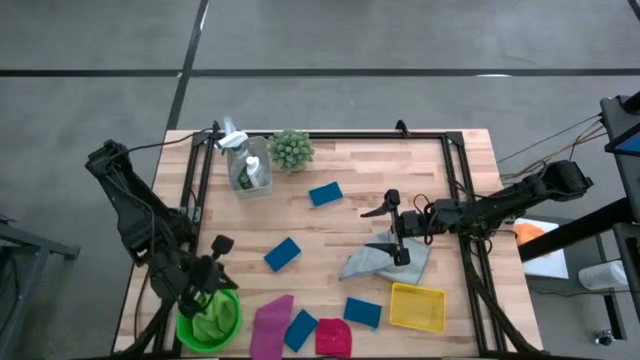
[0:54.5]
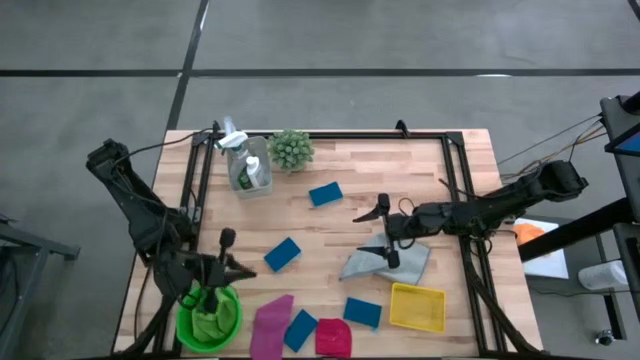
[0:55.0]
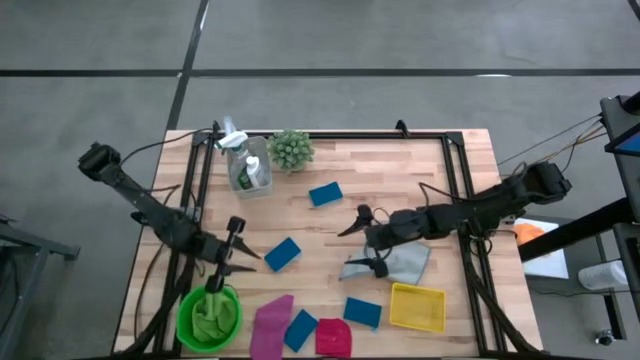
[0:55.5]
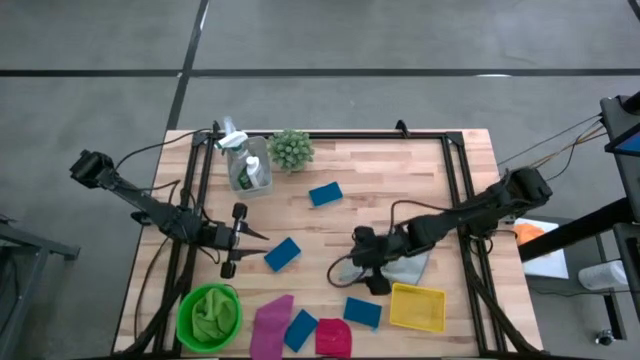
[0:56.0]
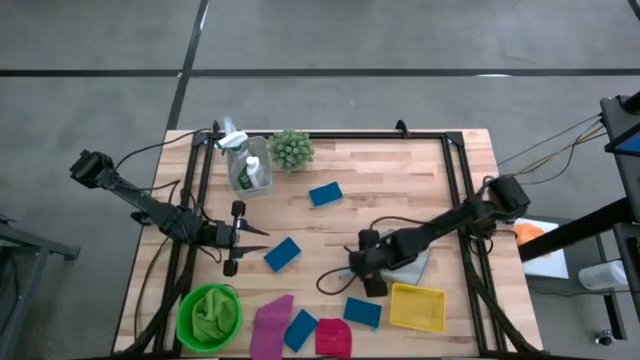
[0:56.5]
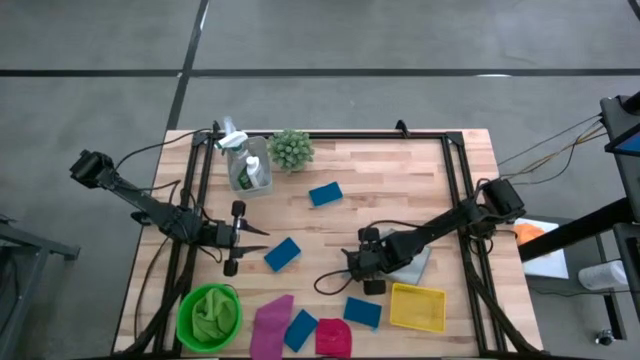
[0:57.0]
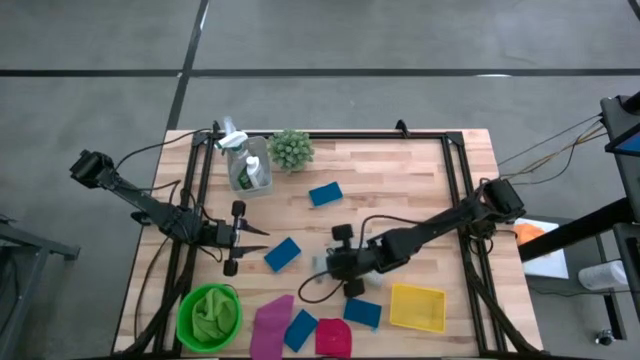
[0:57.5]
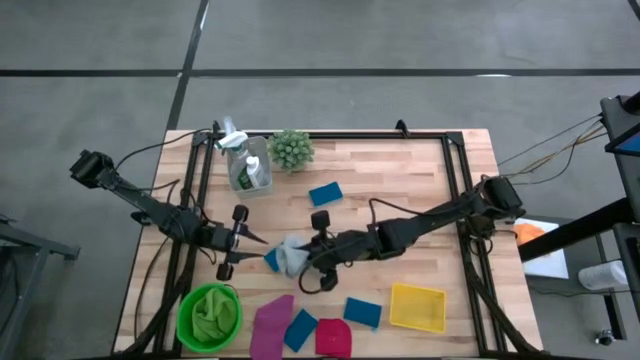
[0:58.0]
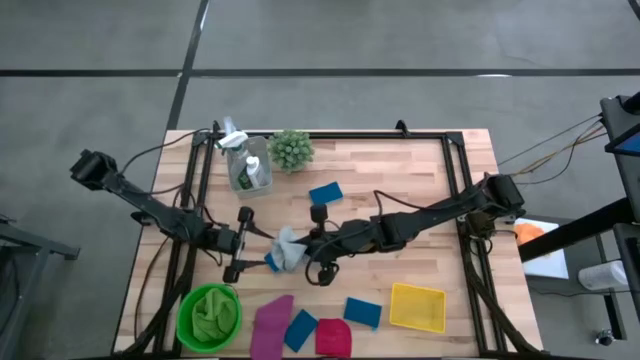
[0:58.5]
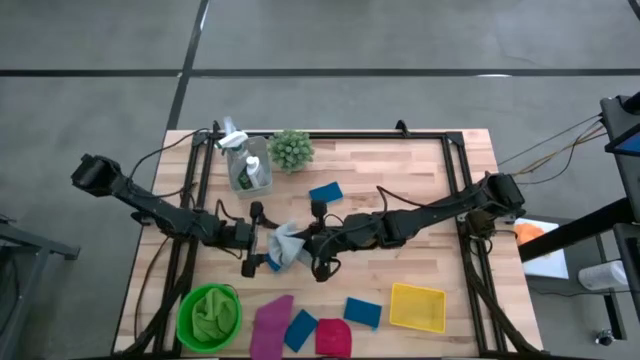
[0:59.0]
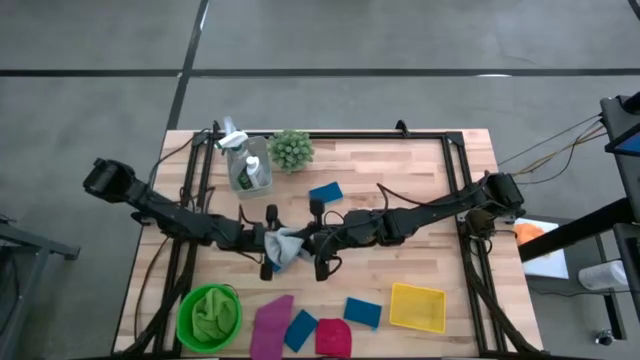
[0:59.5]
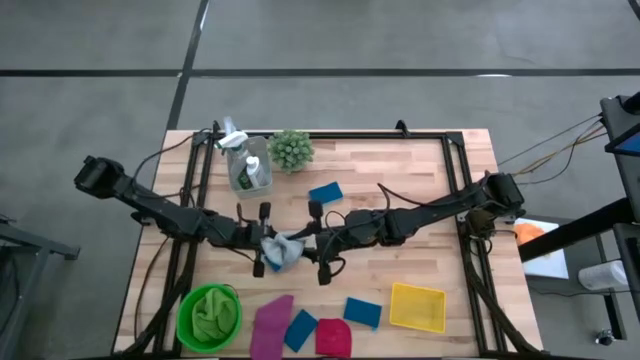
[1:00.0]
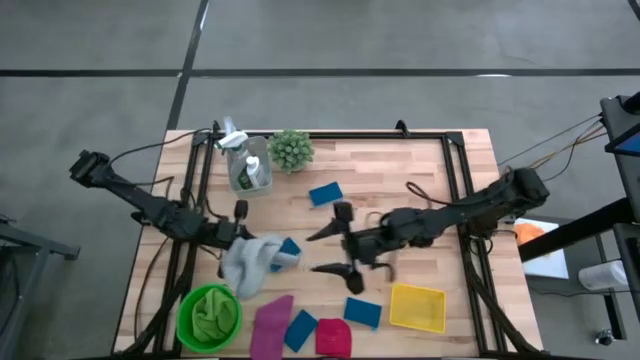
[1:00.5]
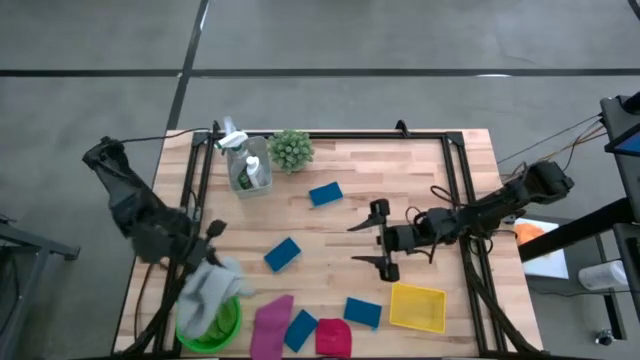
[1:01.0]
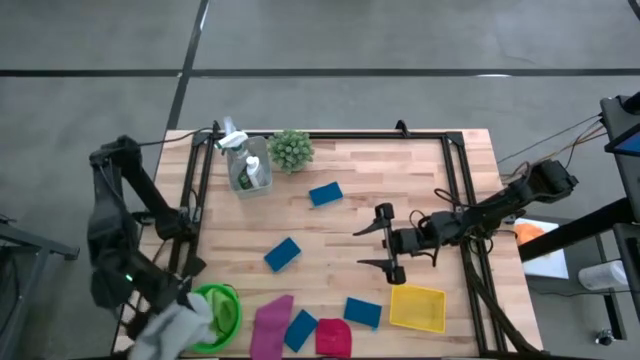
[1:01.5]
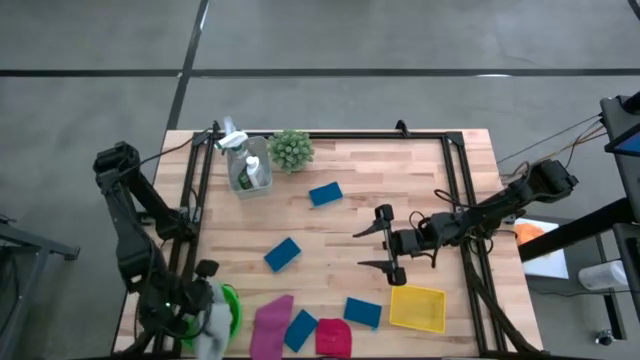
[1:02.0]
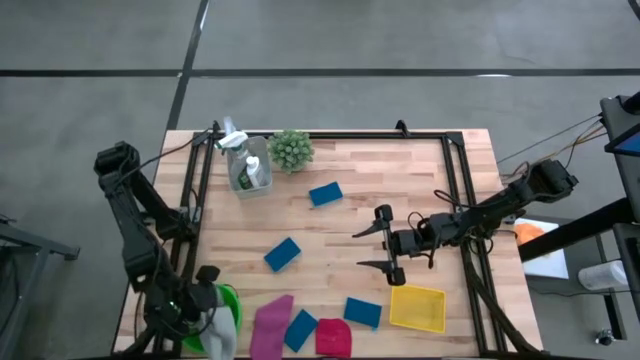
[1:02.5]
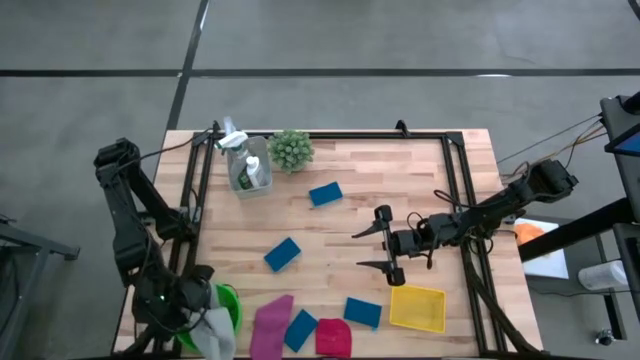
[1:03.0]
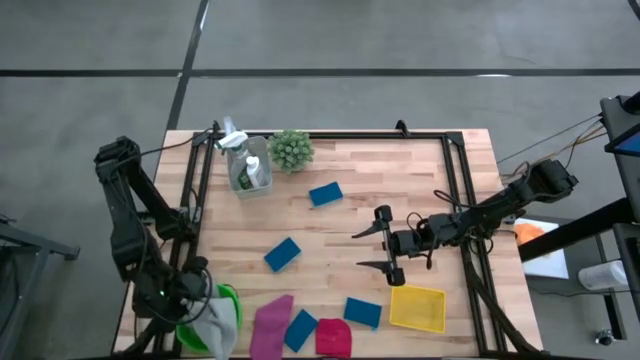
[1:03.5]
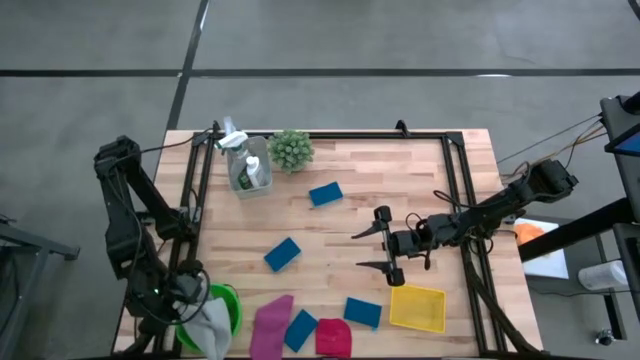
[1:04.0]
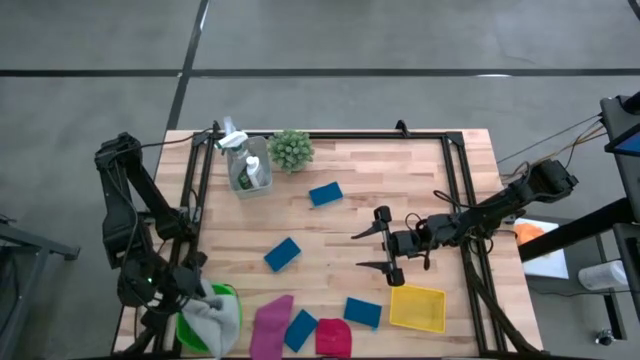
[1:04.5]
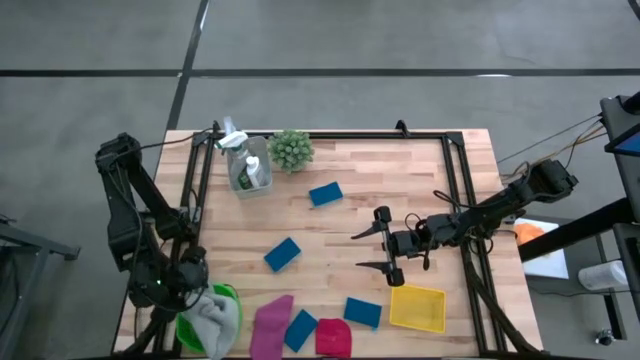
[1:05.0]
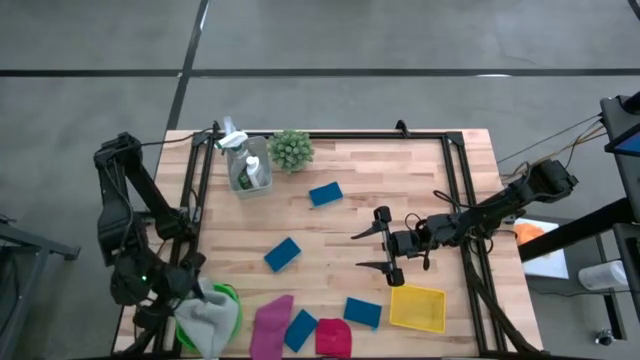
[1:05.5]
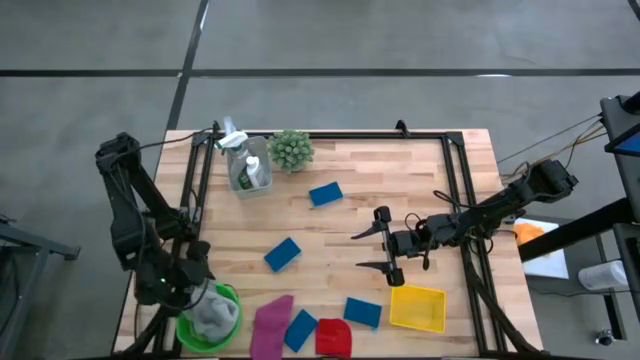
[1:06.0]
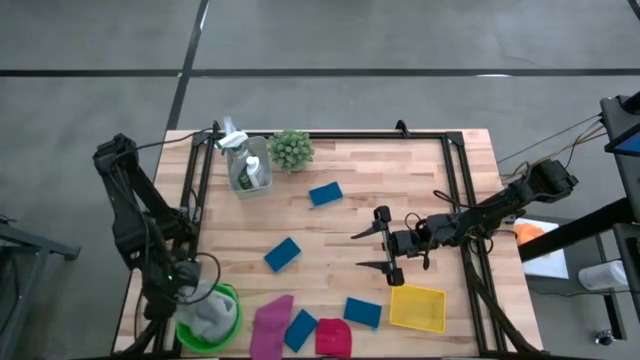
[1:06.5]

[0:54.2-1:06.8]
Task: Pick & Place Kitchen Items
Put the gray towel into the green bucket

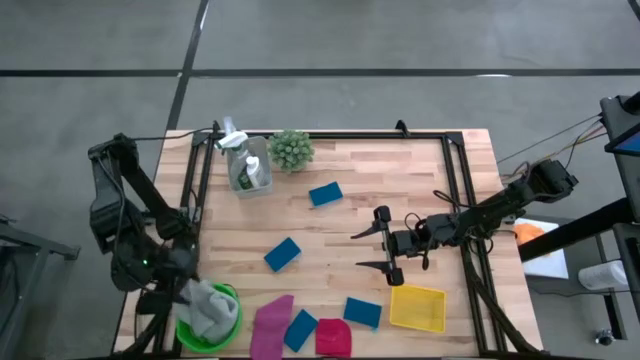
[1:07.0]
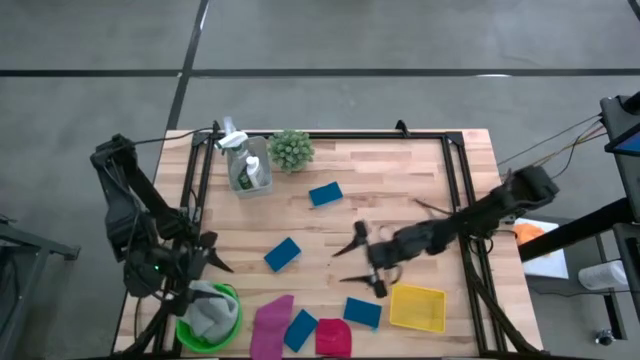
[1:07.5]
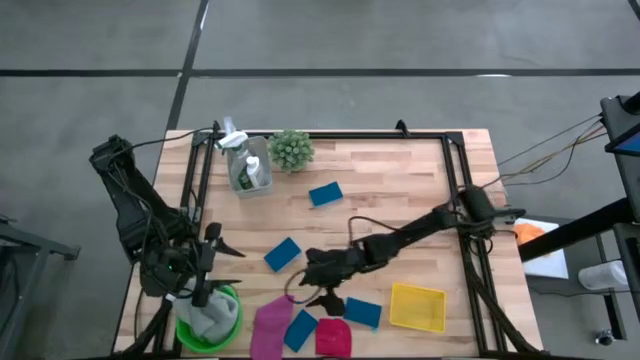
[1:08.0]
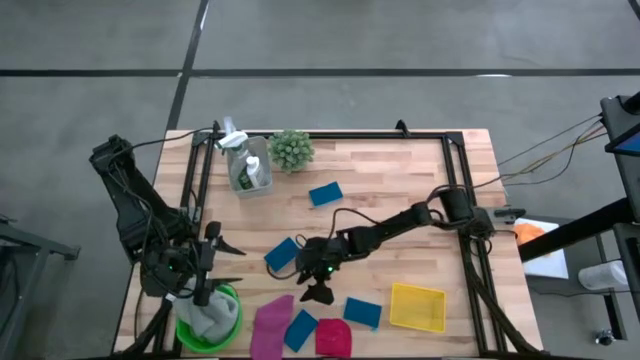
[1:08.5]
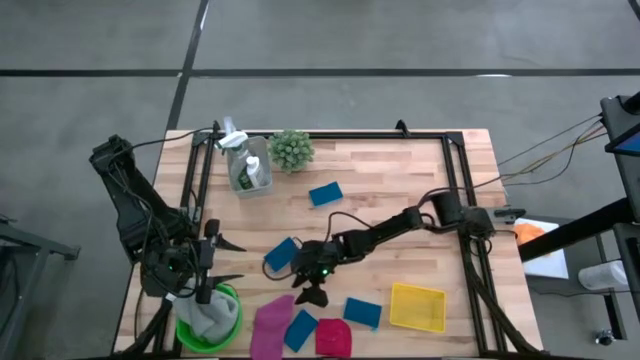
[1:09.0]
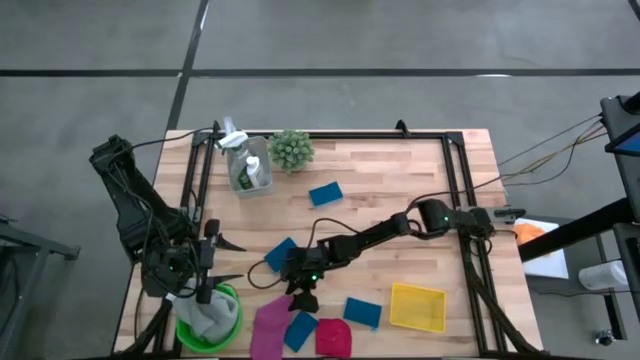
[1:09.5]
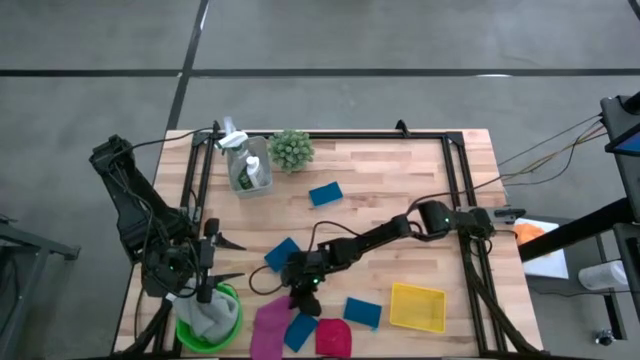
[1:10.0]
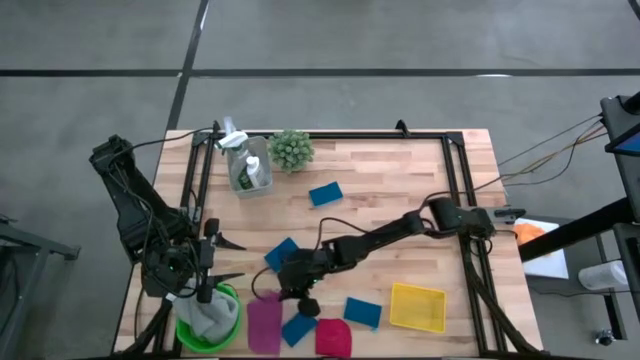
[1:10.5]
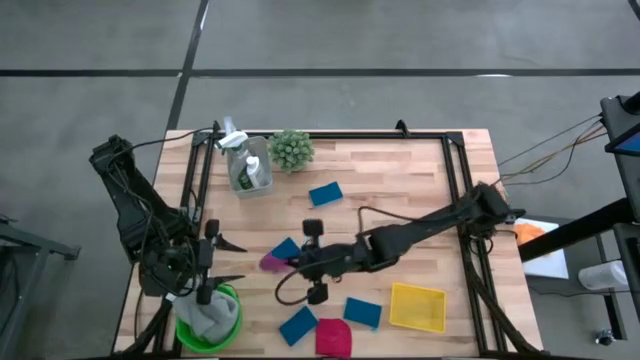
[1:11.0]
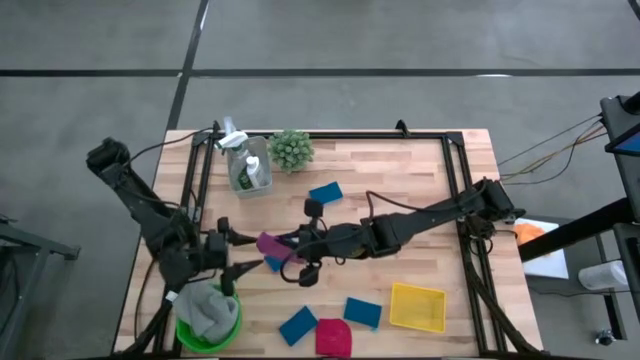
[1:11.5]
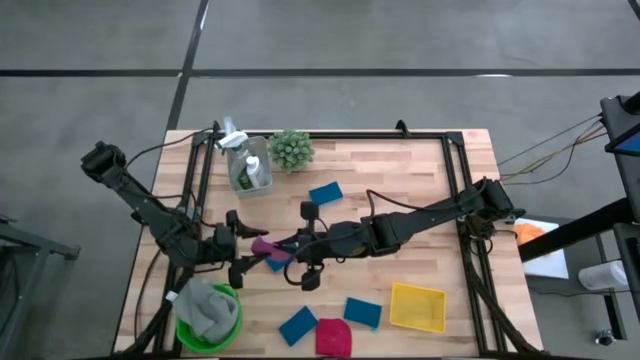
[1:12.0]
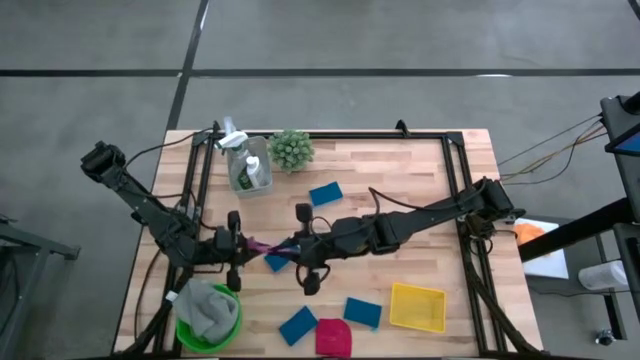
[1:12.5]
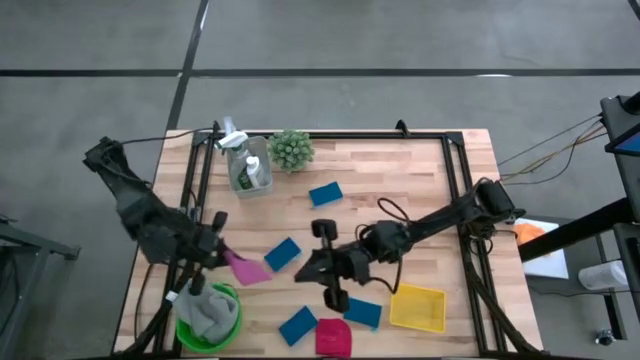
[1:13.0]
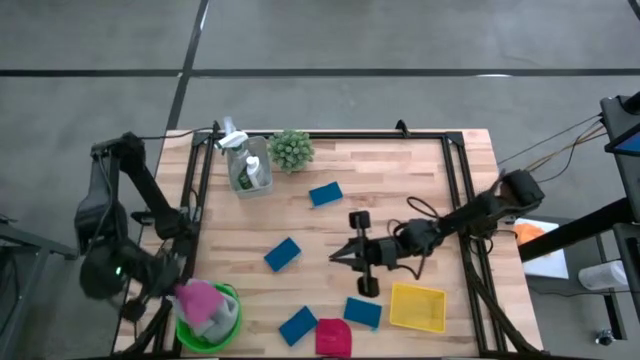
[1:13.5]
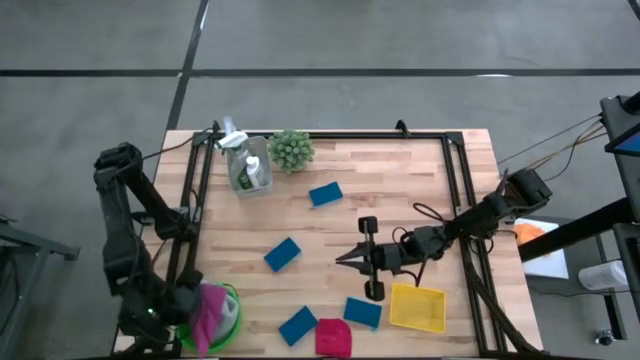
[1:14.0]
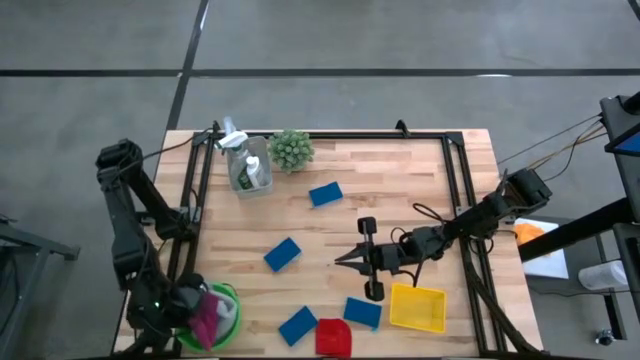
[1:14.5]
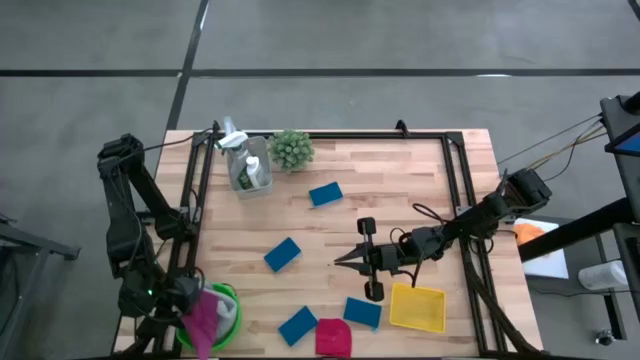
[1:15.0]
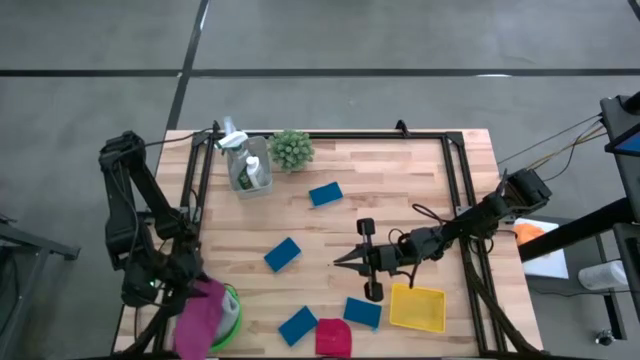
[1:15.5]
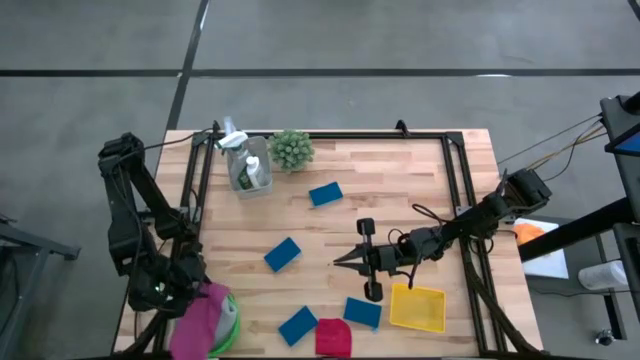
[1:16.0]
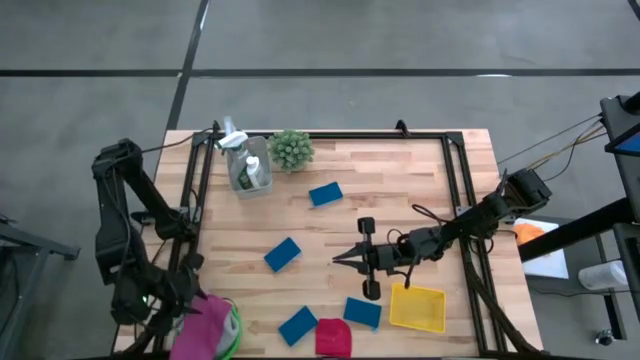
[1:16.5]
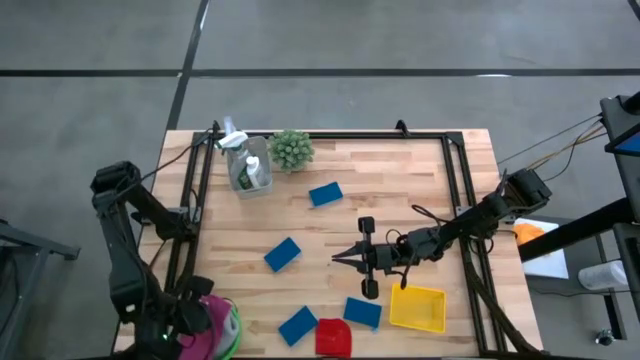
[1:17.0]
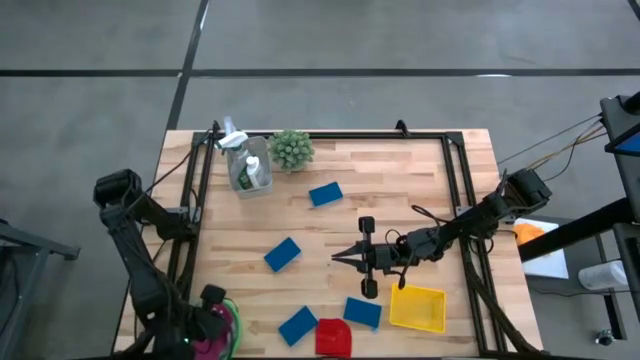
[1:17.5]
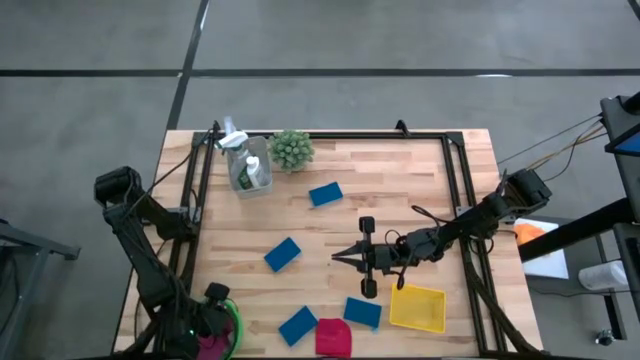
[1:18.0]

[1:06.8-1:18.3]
Put the pink towel into the green bucket
